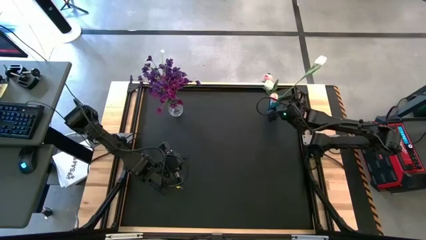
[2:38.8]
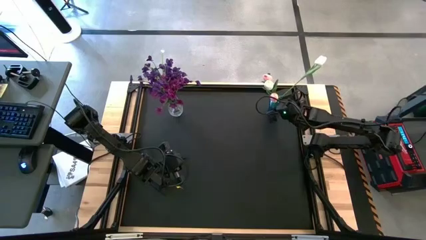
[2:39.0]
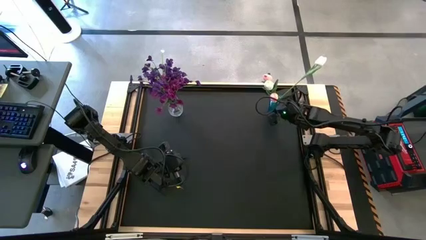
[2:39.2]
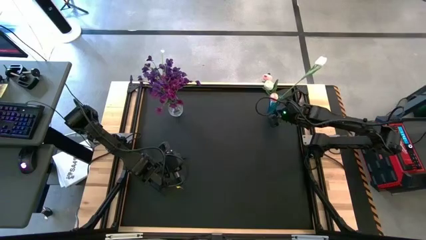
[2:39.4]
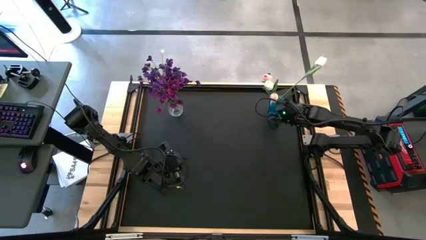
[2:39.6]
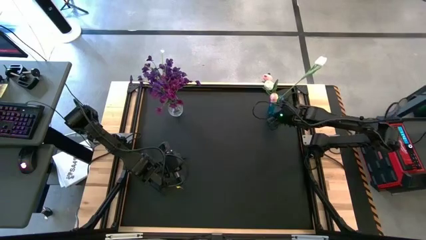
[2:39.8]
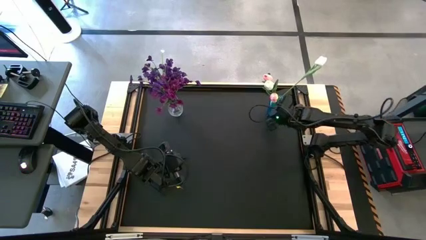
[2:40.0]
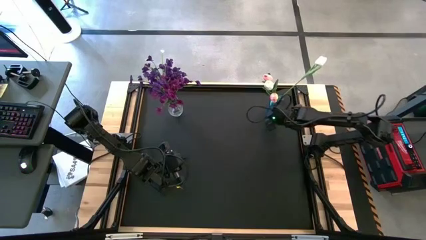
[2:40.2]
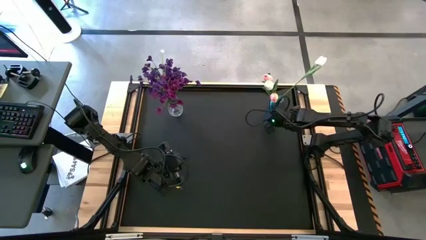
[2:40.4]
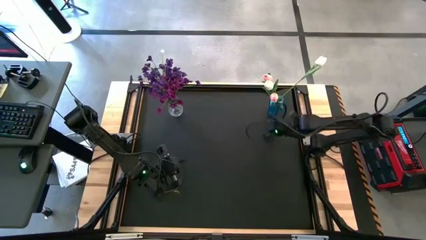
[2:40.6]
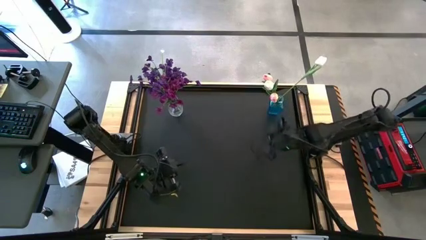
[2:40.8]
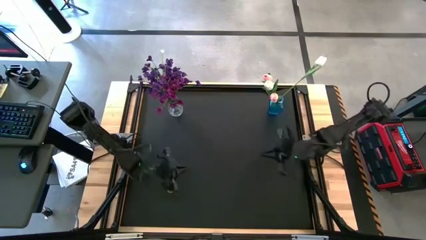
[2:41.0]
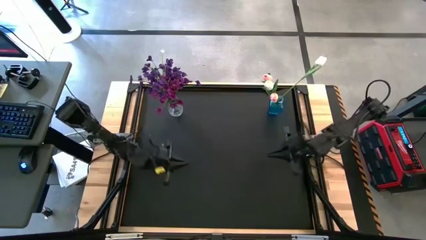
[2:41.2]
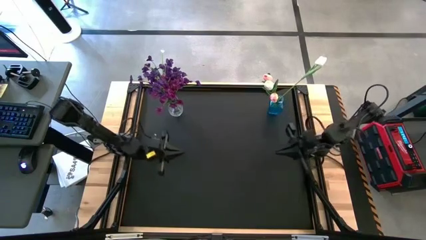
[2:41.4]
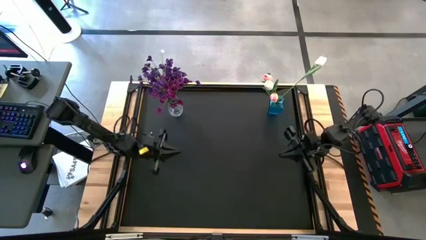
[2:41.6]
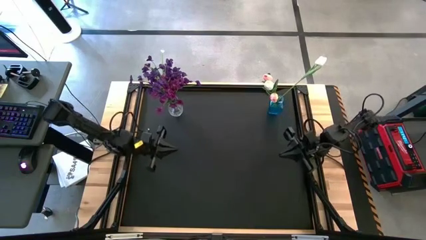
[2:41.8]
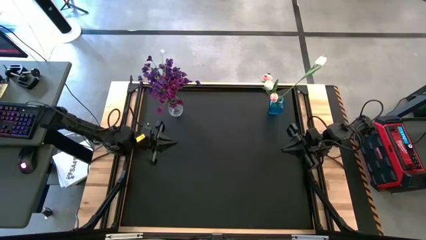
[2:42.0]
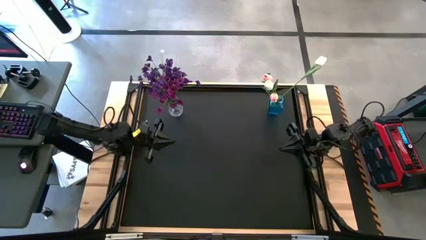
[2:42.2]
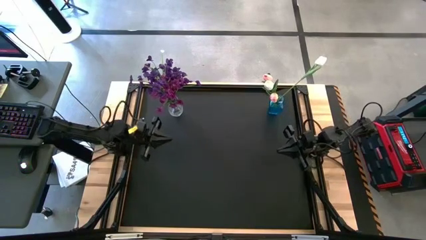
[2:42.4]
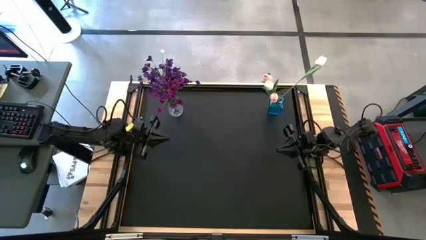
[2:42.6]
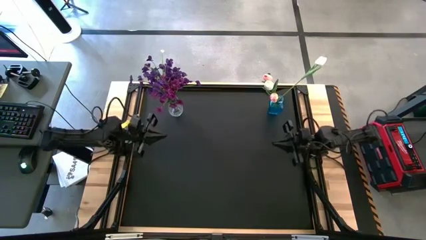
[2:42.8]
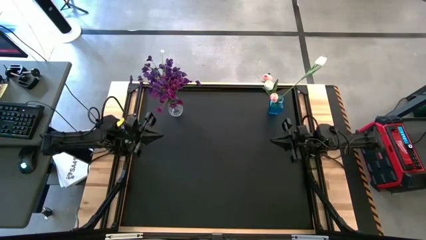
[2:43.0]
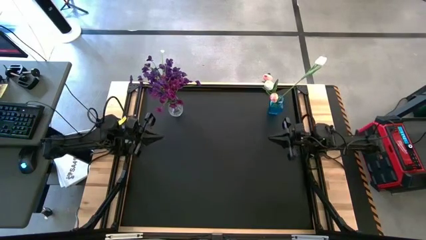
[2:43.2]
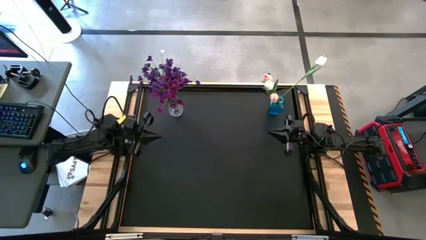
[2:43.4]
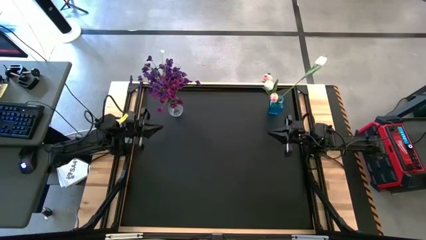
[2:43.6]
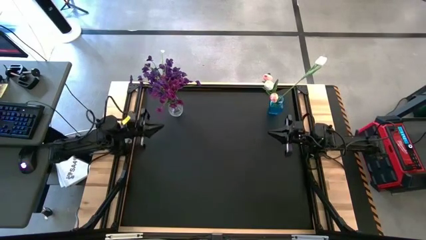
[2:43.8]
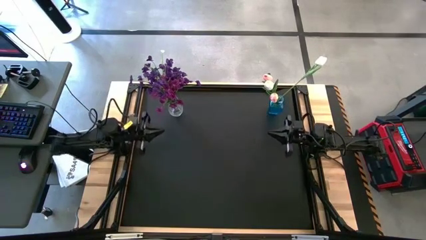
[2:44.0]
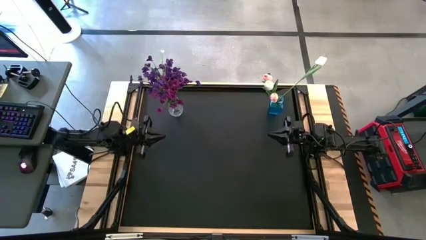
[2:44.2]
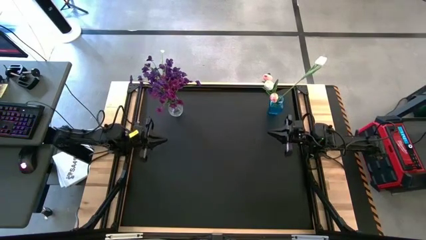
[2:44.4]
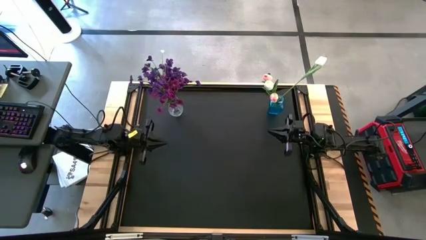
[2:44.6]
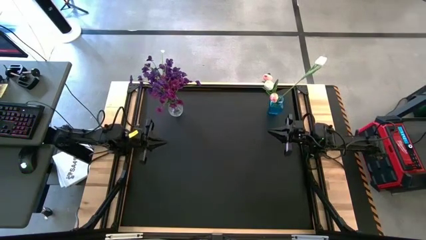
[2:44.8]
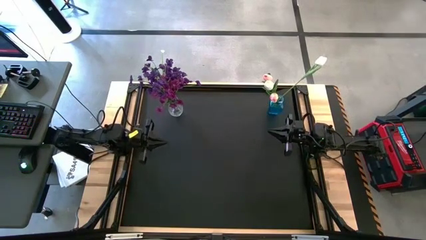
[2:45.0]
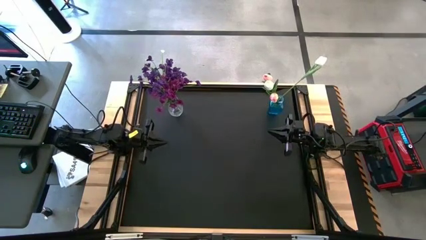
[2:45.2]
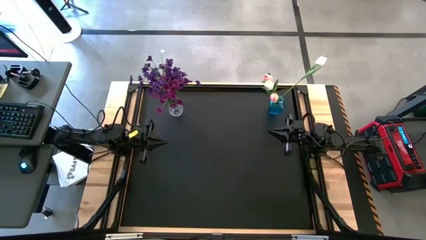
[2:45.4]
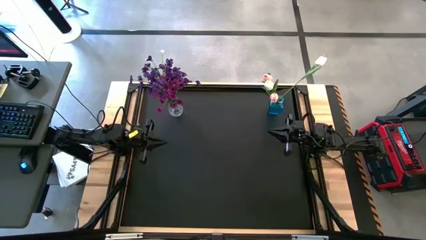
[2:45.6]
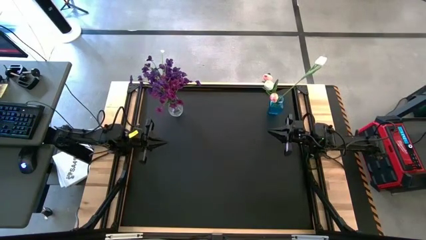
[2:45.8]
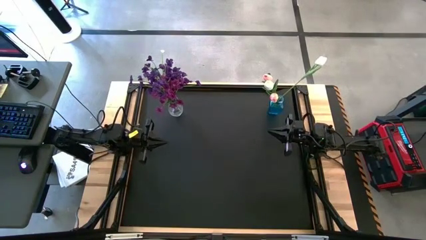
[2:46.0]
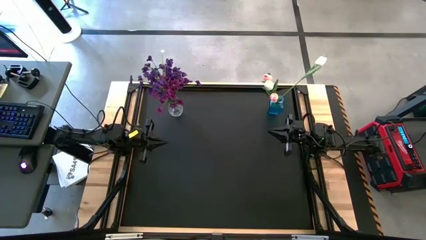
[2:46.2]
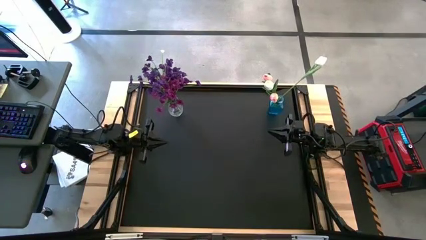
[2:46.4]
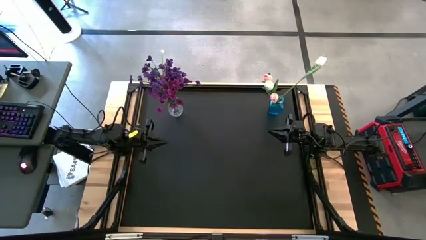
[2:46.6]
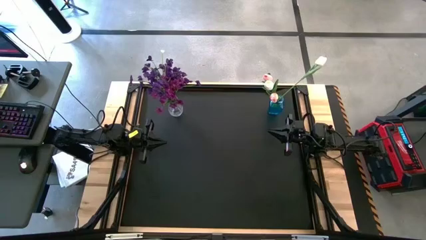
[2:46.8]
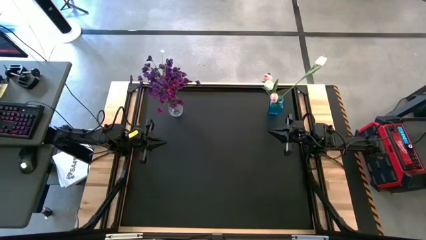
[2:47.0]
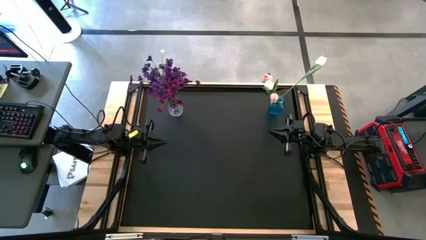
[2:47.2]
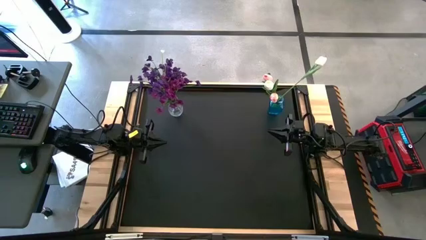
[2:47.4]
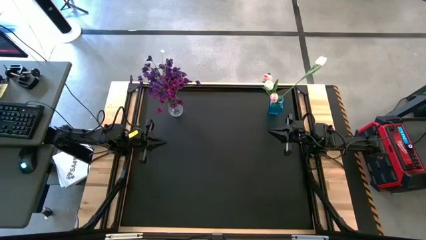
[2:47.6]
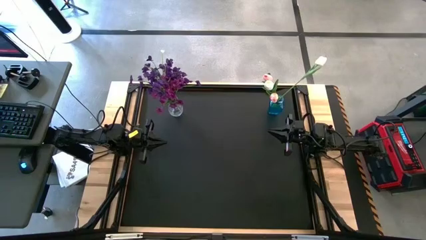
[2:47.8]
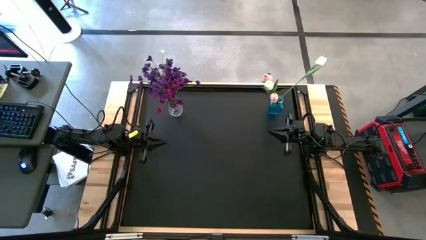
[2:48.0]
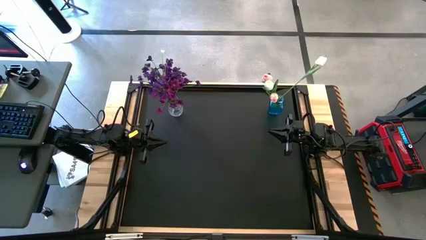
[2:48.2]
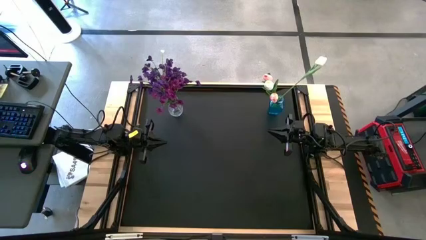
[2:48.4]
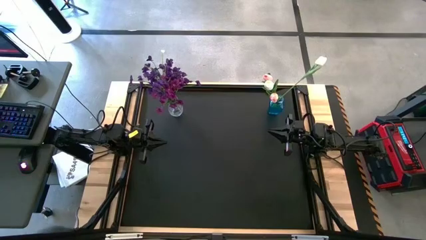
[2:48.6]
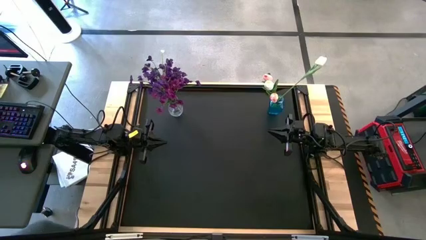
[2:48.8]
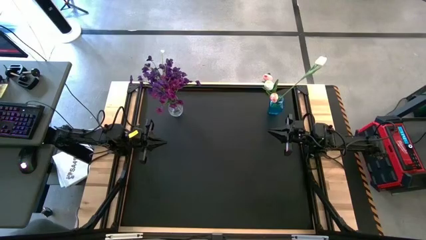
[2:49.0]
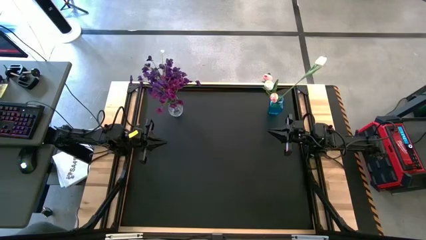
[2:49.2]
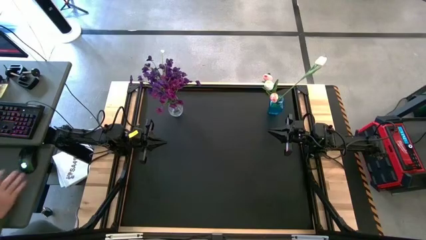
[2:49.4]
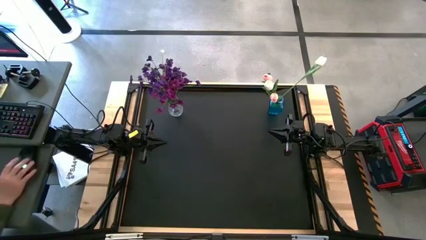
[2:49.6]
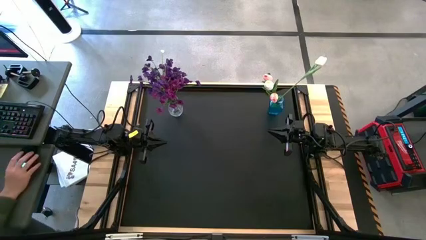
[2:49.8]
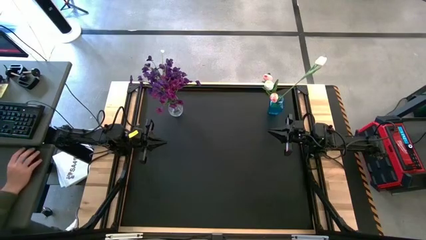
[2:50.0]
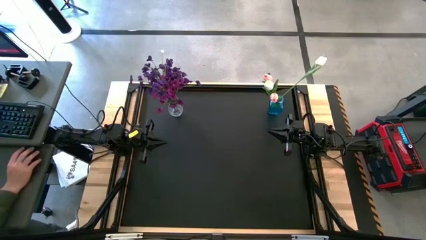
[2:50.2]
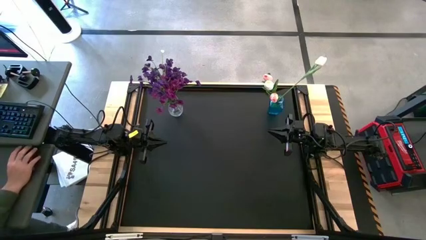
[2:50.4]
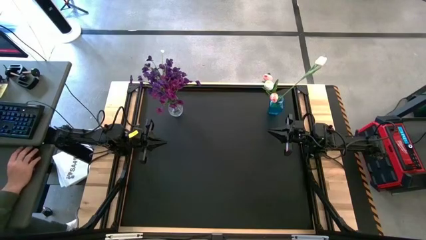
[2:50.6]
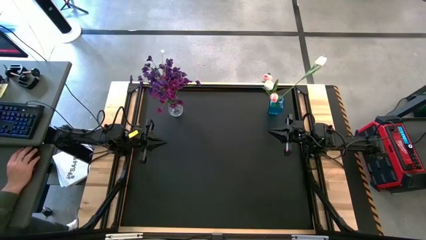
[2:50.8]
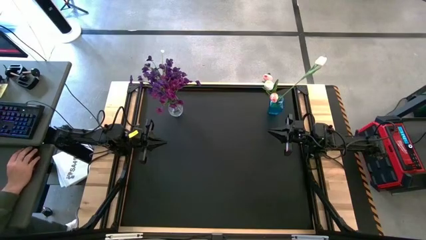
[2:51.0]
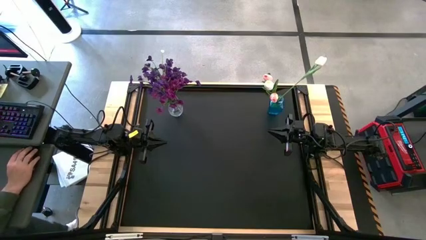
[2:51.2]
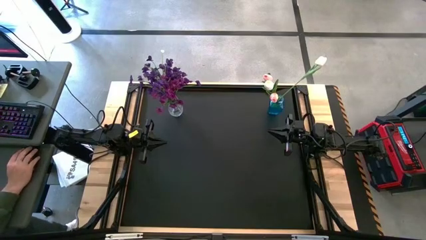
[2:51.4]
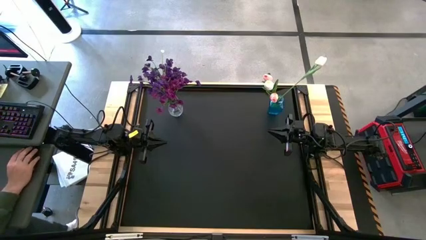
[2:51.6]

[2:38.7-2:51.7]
Task: Sort flowers into vase by color
Return to Home Position
